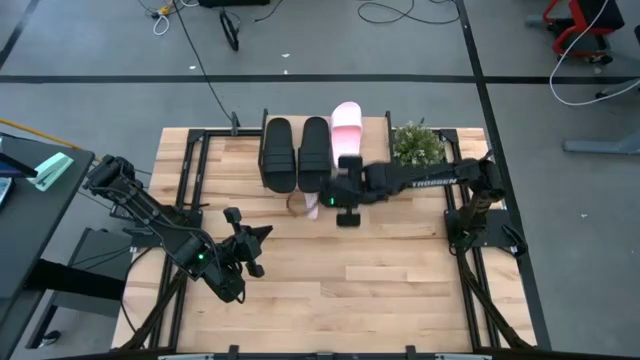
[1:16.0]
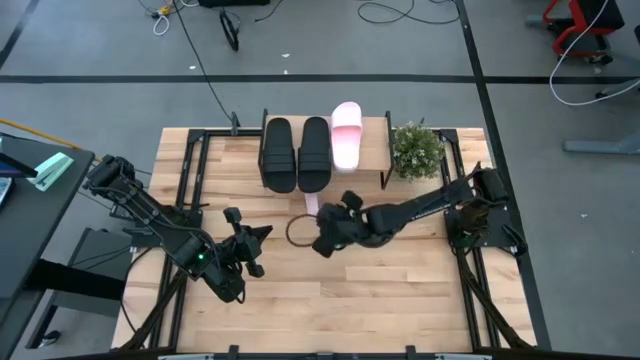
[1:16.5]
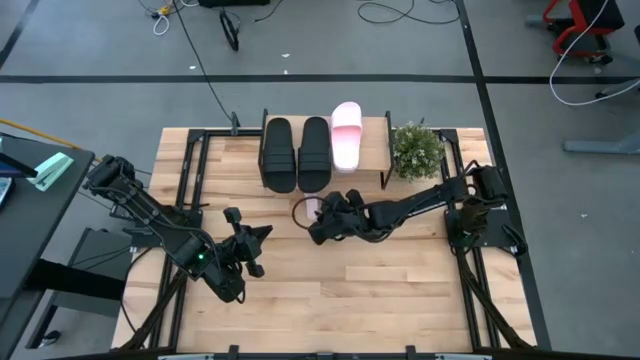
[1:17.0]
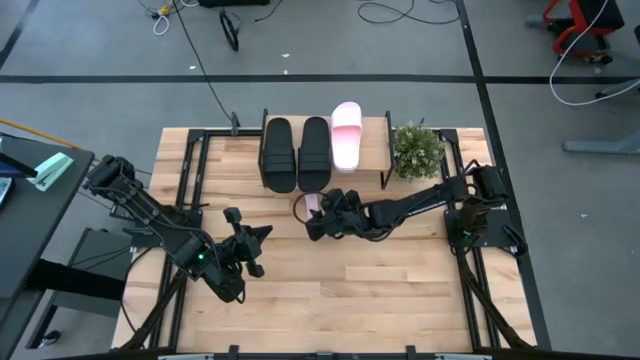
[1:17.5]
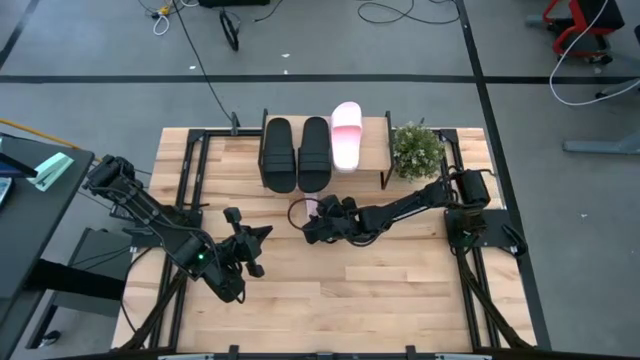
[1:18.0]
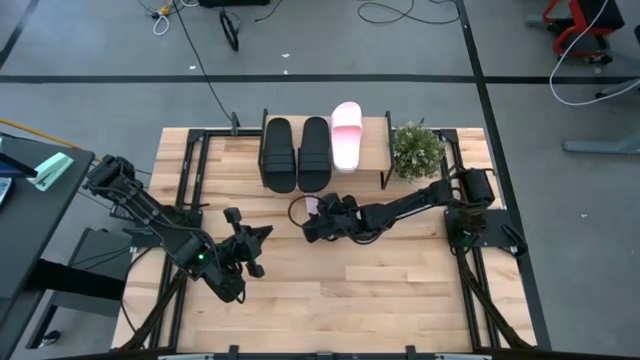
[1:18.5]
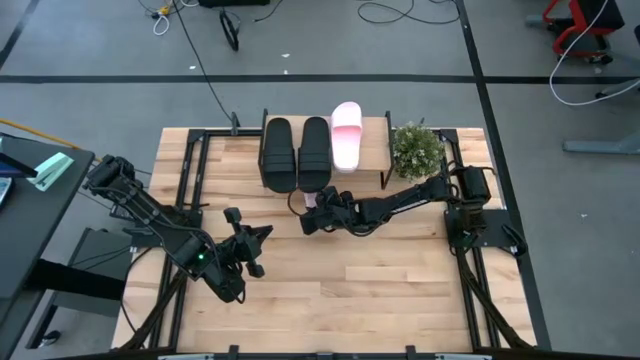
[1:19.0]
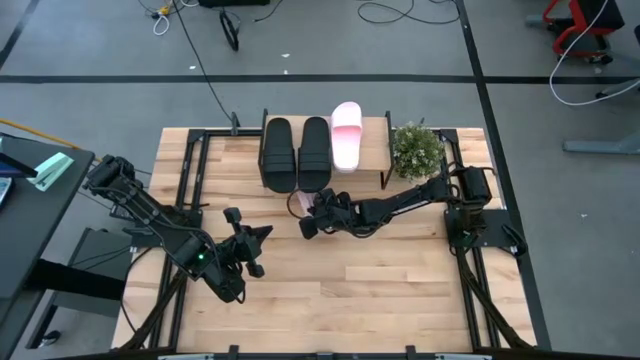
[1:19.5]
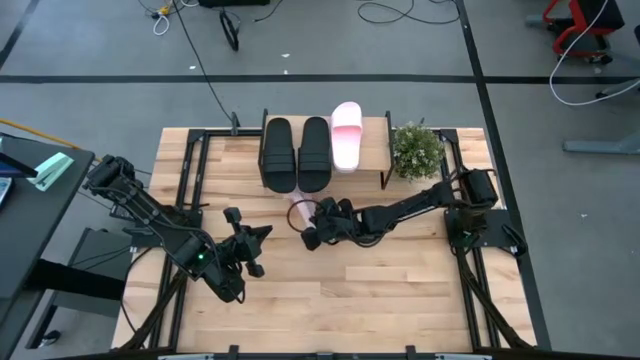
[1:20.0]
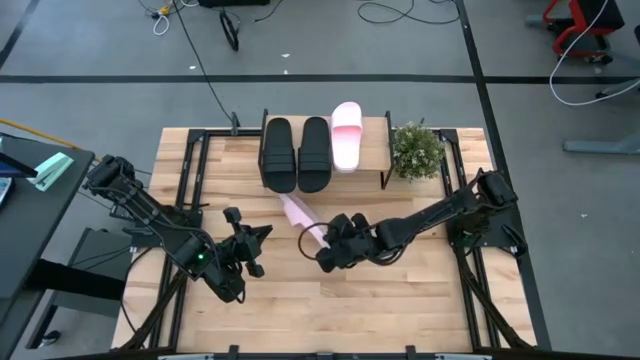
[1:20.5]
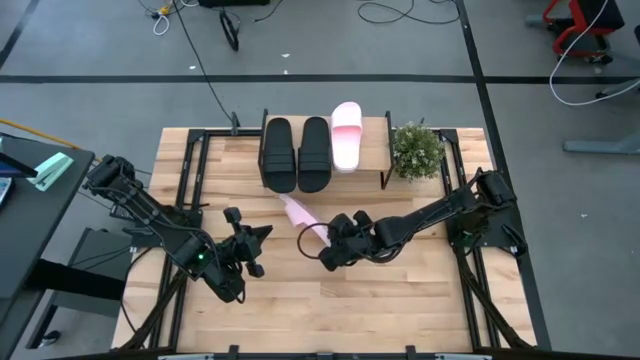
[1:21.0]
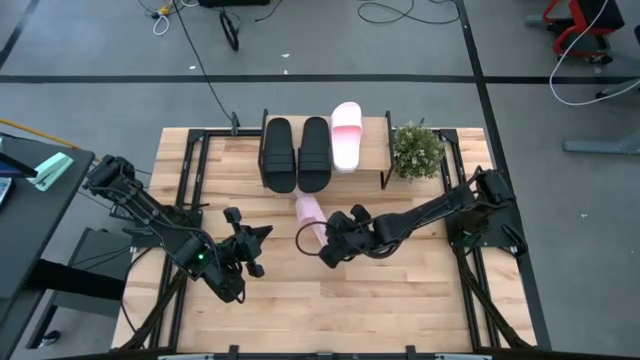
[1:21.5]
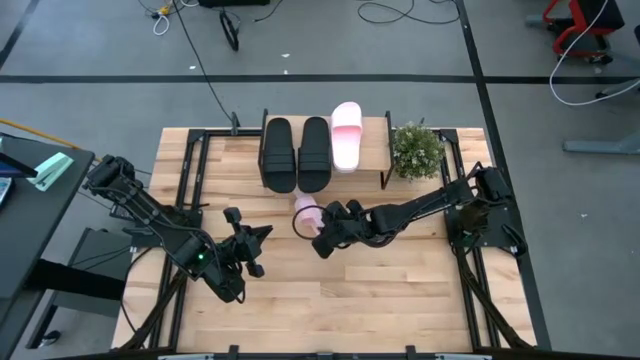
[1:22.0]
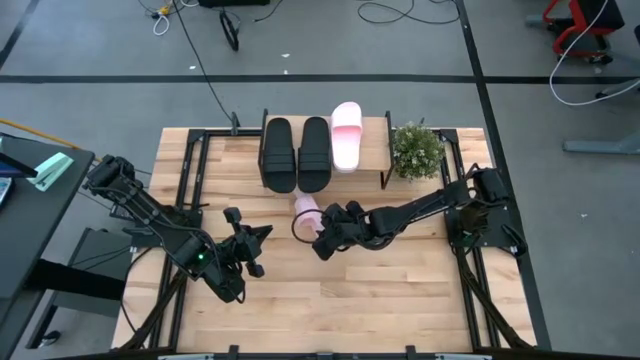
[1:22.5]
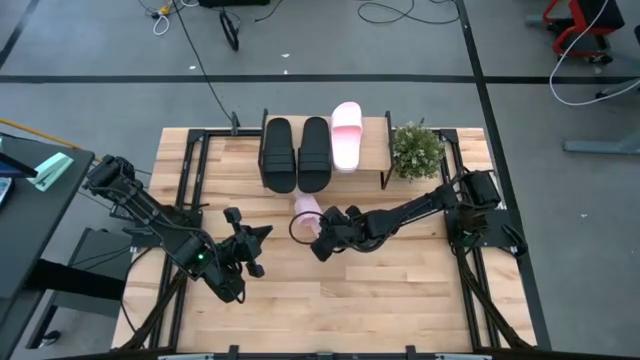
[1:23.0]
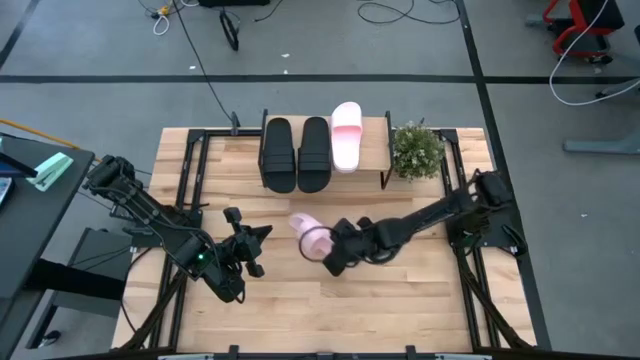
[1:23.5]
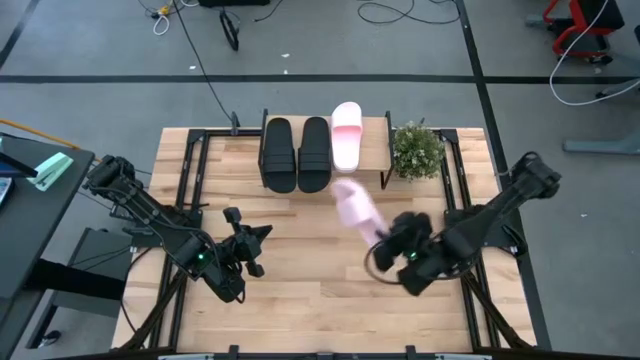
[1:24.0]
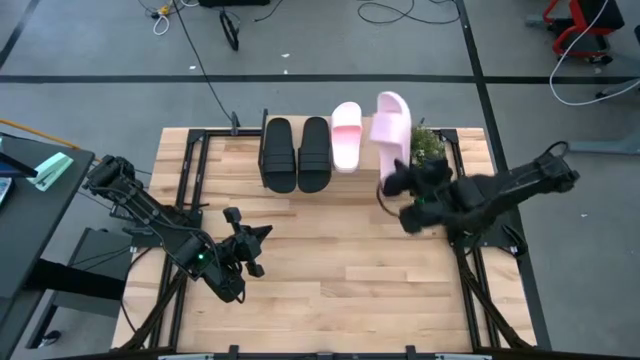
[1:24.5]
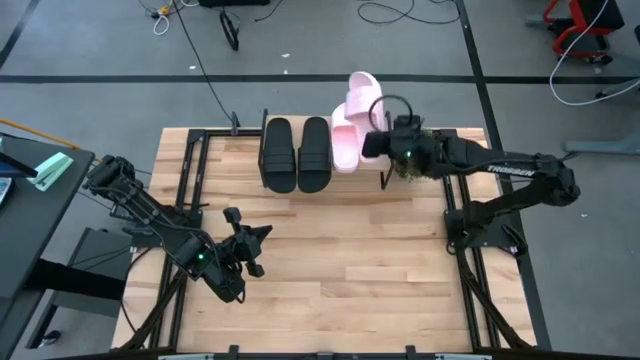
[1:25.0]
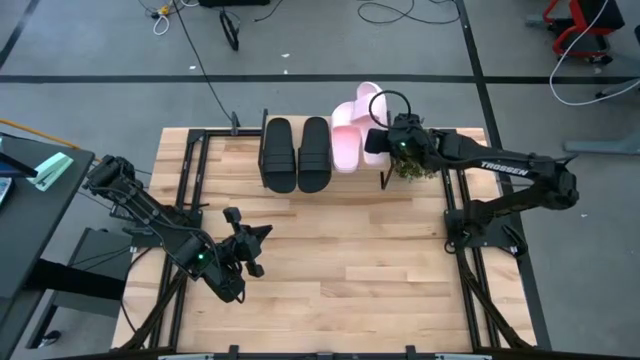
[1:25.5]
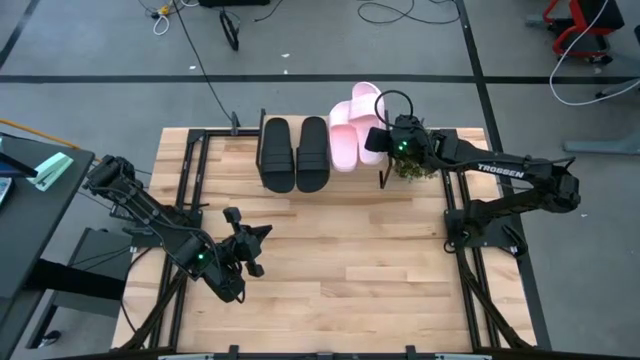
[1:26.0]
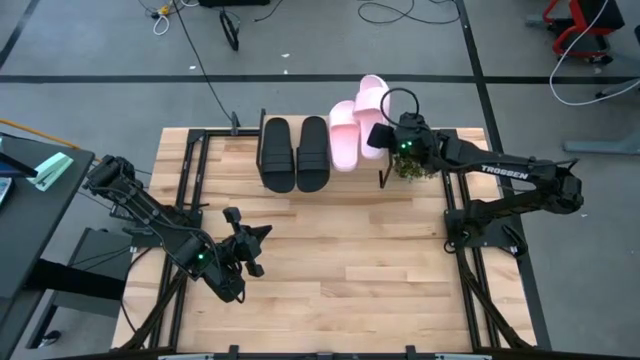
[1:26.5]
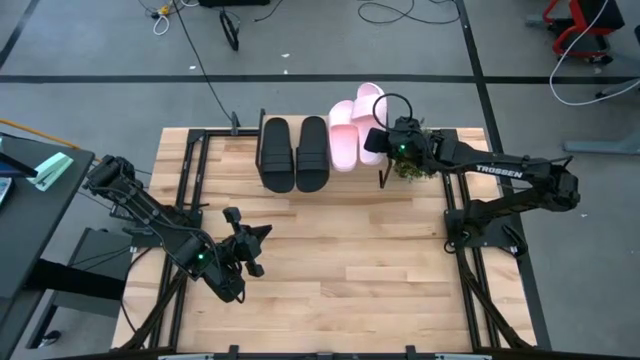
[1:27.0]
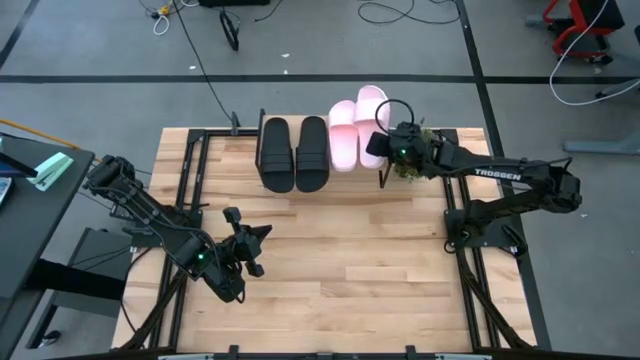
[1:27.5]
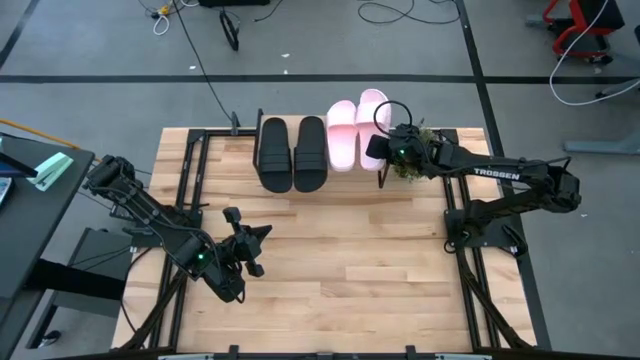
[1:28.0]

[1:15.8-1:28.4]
Task: Pick and place slides into the shelf
Put the white slide on the shelf

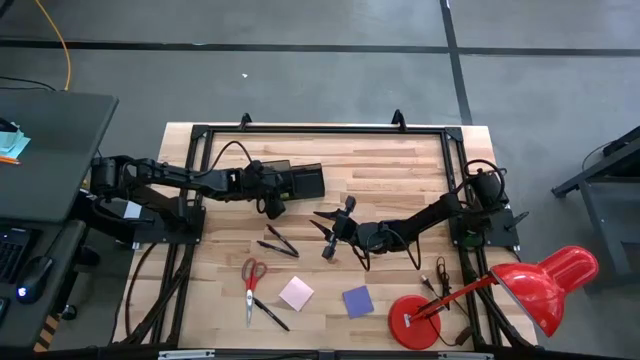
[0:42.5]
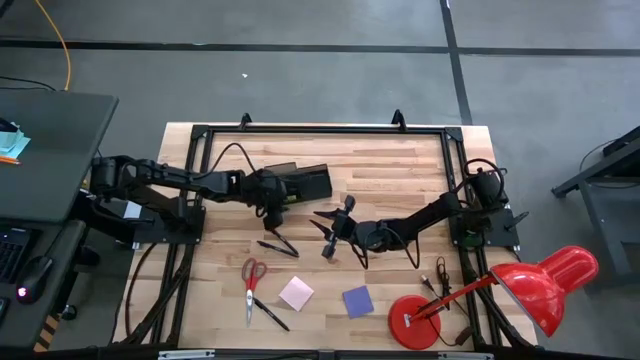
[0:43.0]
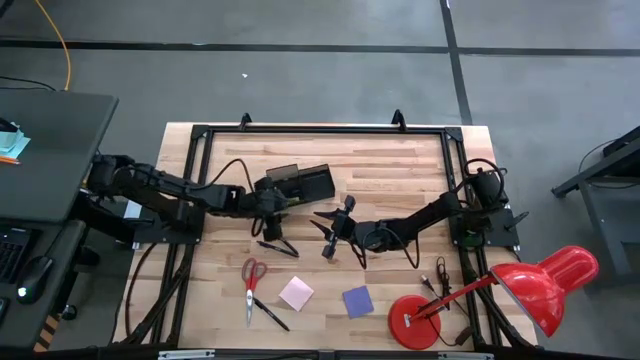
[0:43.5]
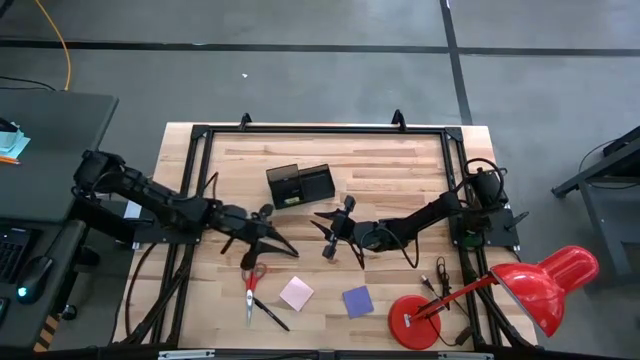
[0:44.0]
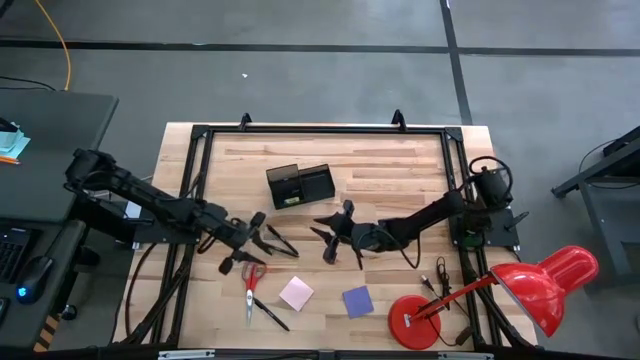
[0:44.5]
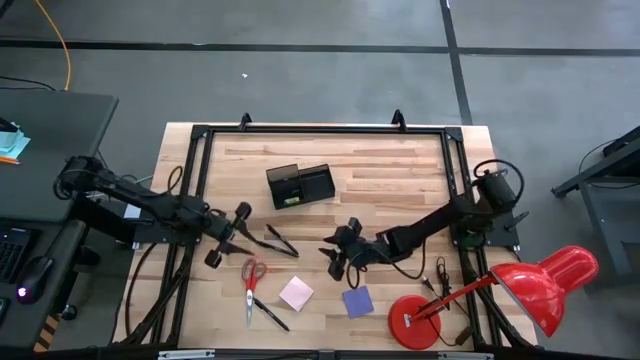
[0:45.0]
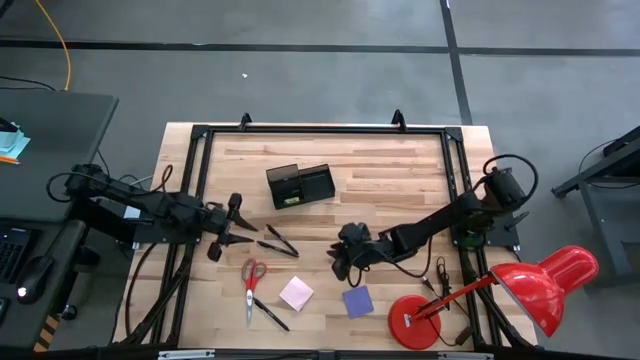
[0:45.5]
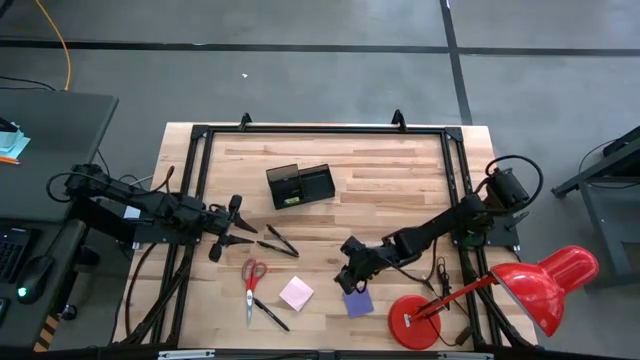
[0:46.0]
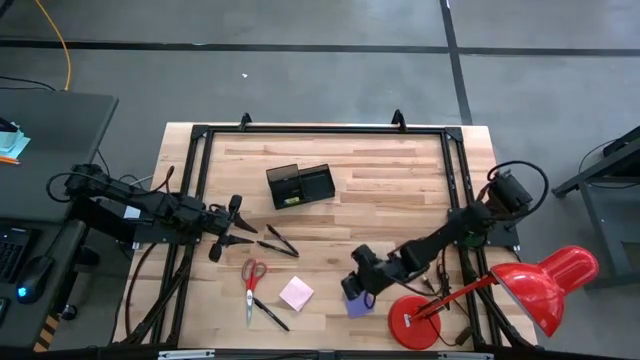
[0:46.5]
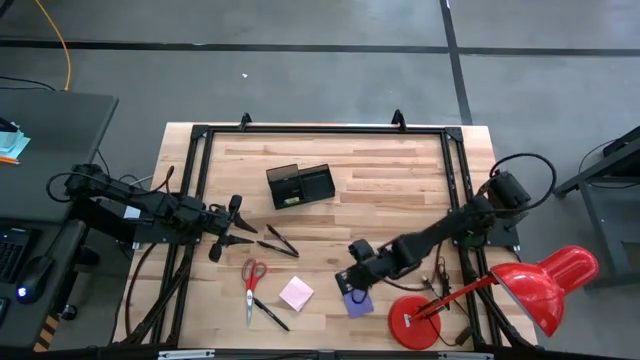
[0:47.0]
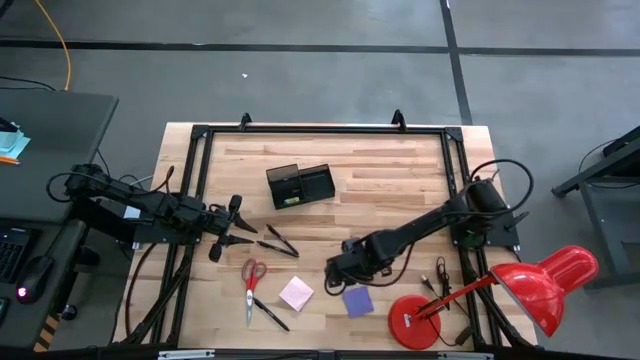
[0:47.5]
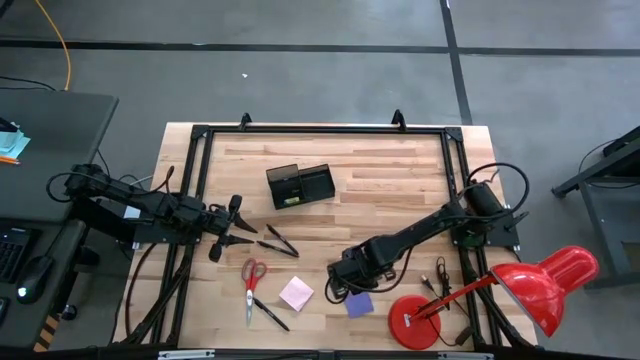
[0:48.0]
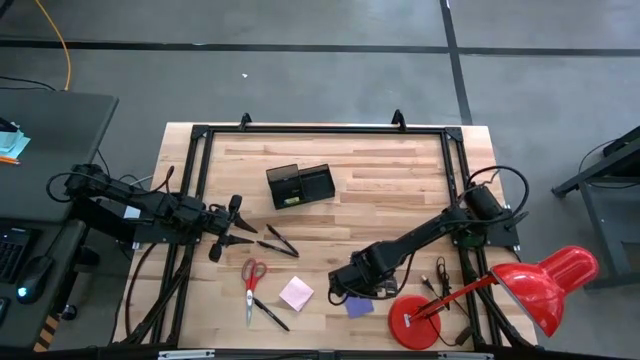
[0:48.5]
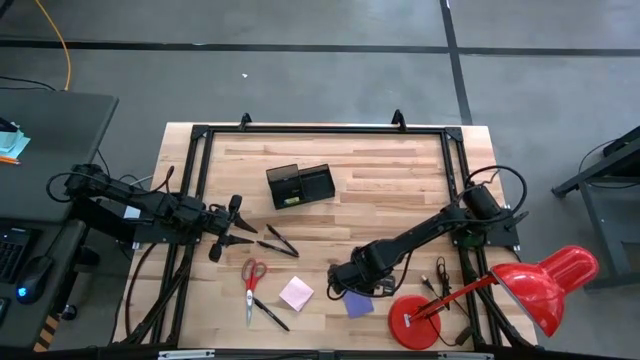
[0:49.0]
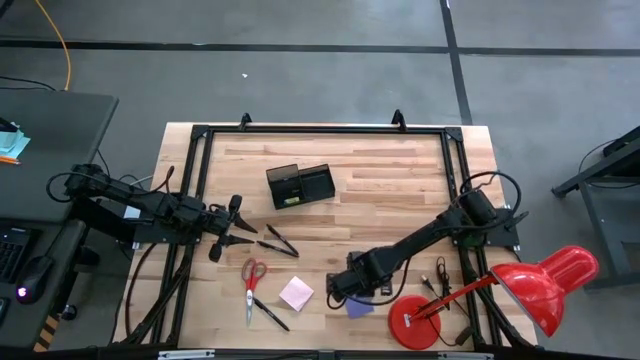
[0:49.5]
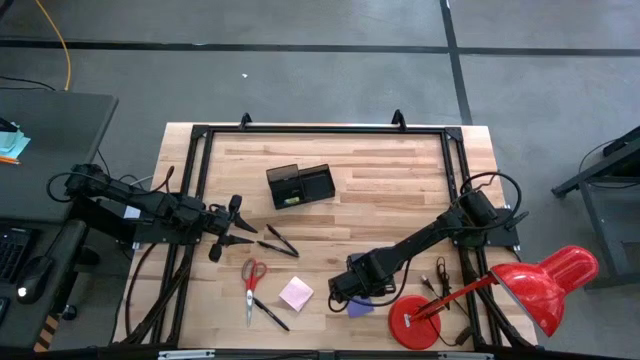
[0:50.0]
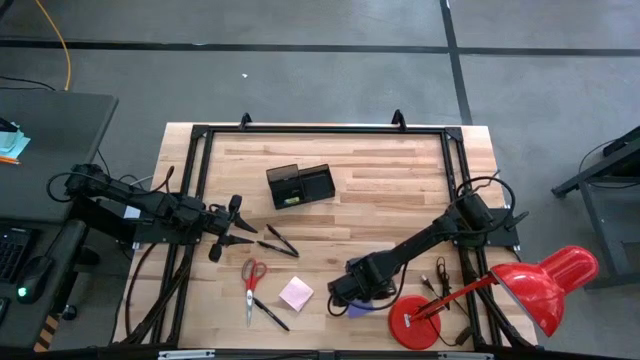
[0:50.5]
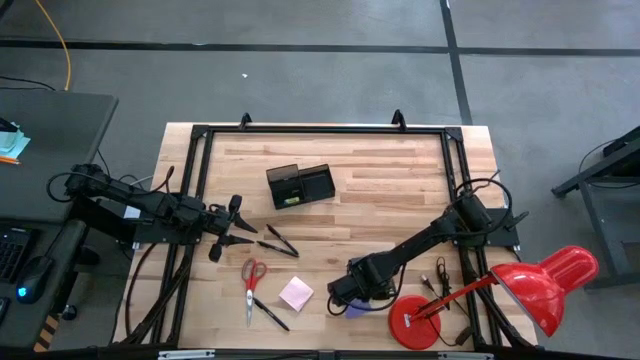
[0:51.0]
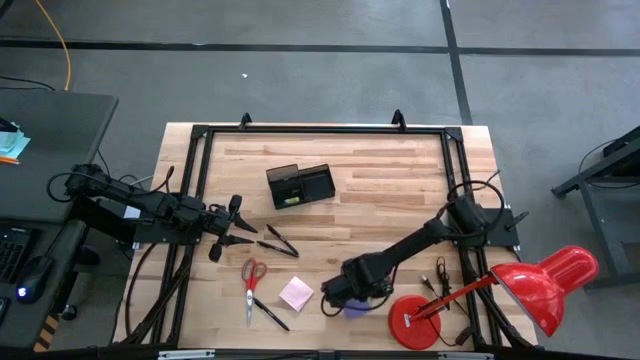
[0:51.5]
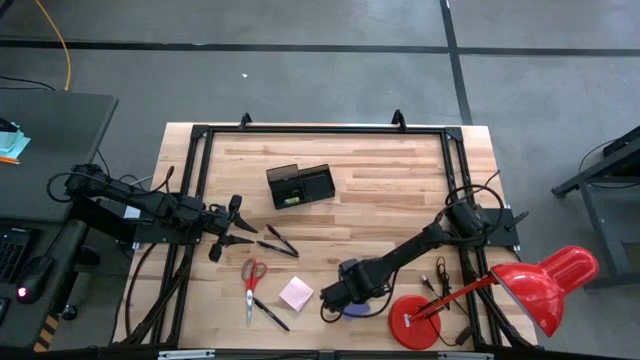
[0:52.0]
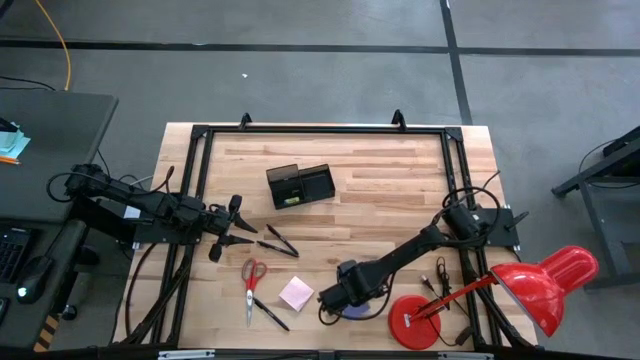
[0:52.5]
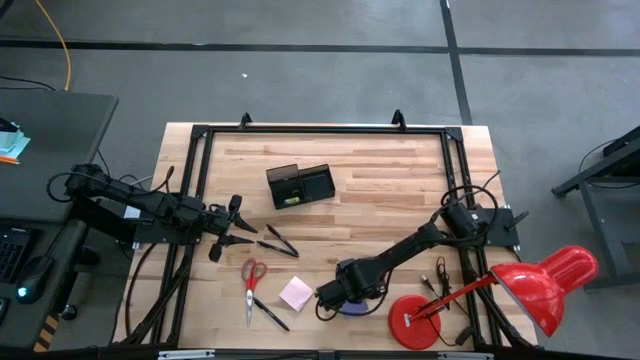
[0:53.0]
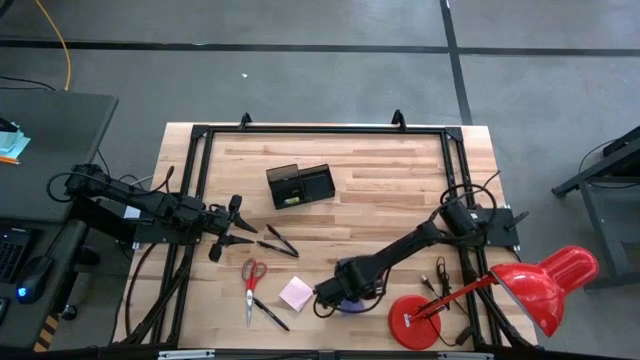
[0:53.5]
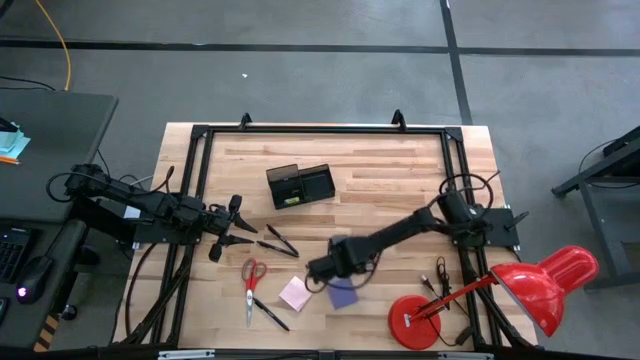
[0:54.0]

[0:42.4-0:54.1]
Task: Pick and place office supplies into organizer
Put the violet sticky notes into the black desk organizer
